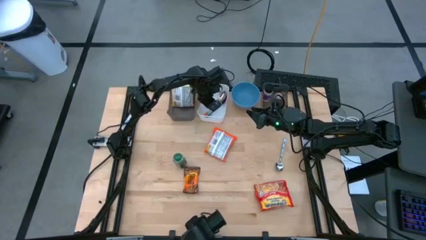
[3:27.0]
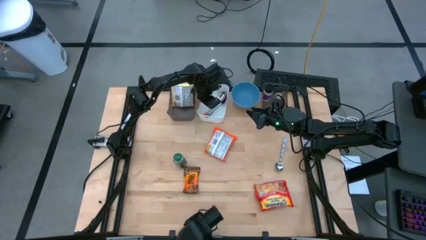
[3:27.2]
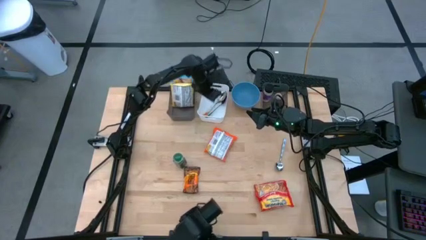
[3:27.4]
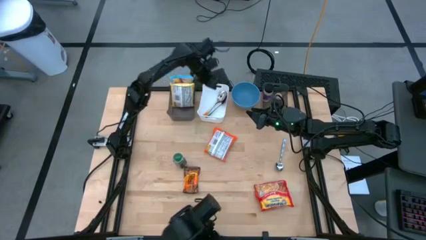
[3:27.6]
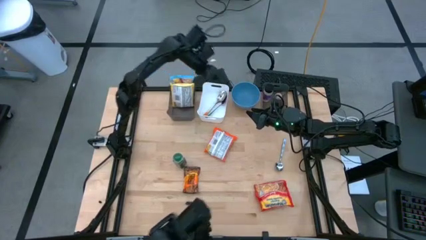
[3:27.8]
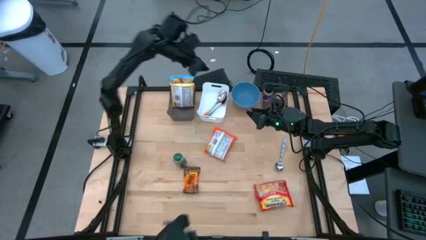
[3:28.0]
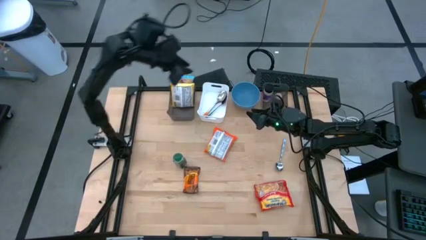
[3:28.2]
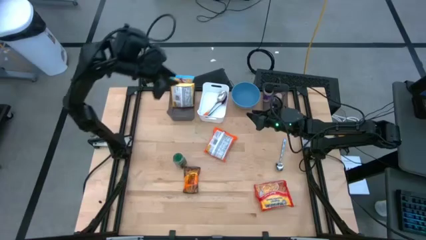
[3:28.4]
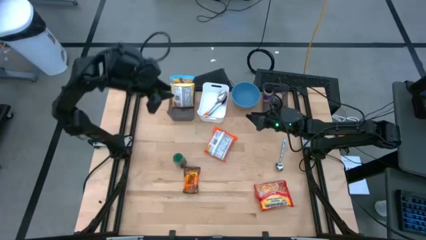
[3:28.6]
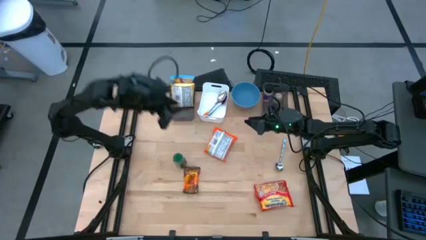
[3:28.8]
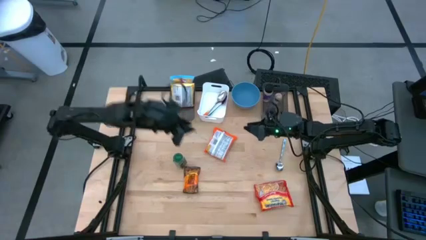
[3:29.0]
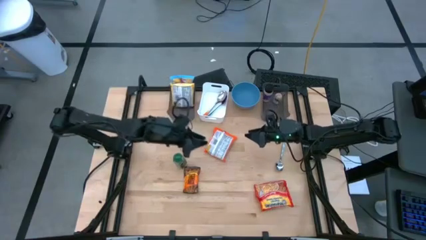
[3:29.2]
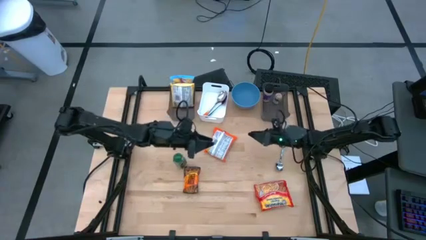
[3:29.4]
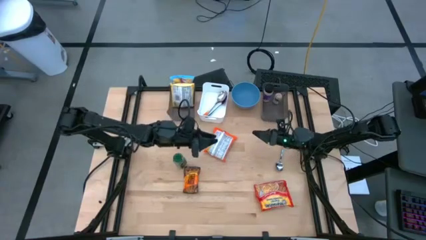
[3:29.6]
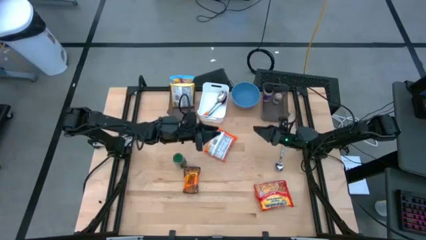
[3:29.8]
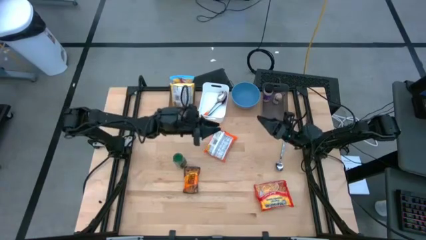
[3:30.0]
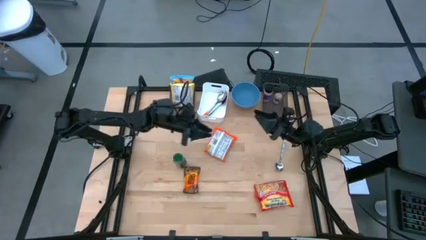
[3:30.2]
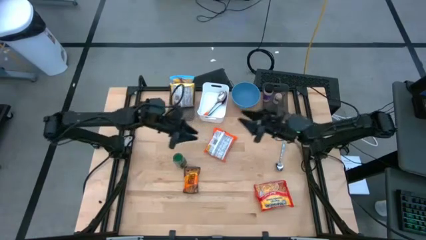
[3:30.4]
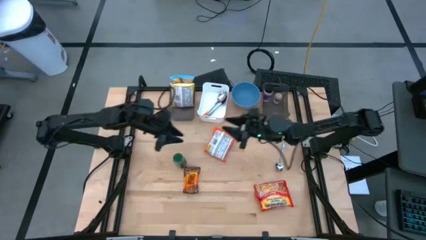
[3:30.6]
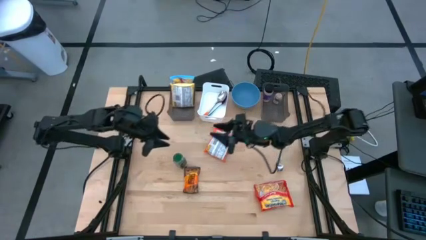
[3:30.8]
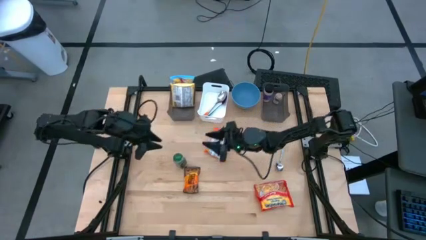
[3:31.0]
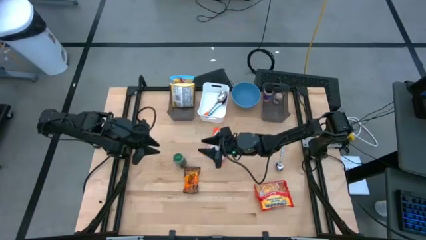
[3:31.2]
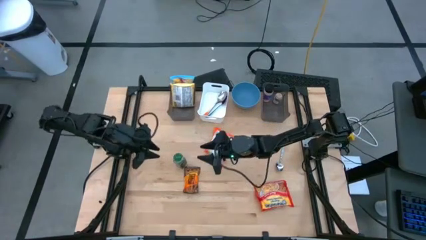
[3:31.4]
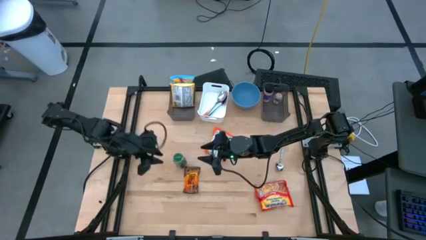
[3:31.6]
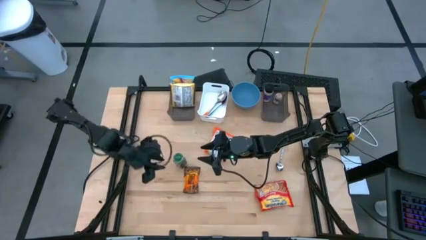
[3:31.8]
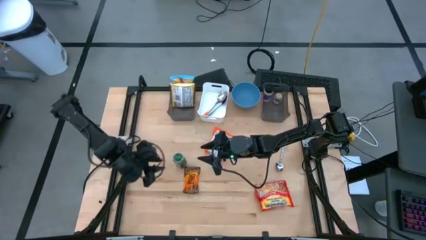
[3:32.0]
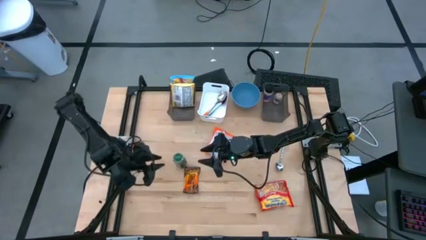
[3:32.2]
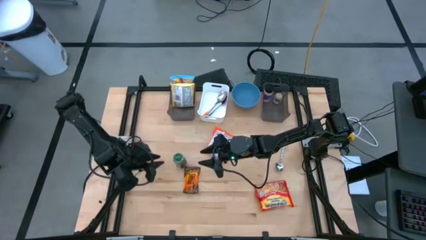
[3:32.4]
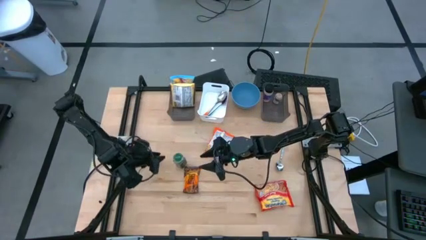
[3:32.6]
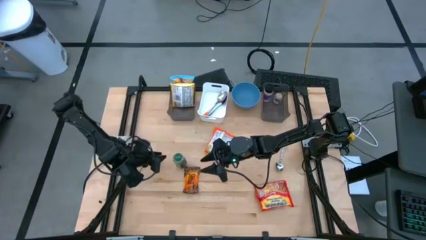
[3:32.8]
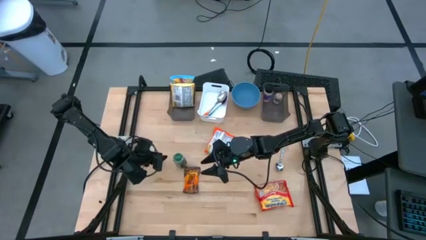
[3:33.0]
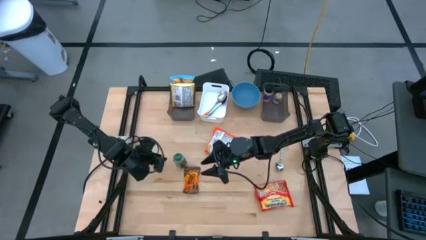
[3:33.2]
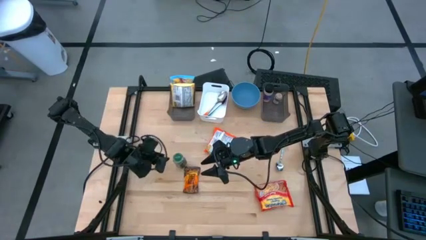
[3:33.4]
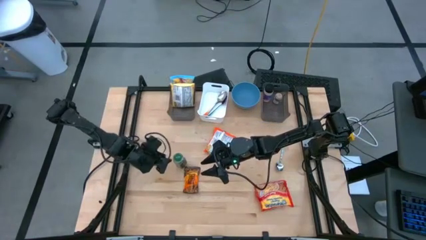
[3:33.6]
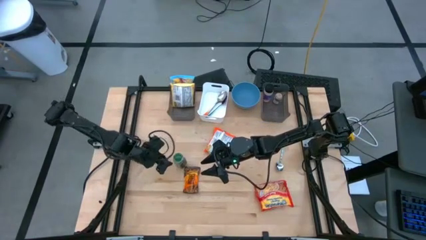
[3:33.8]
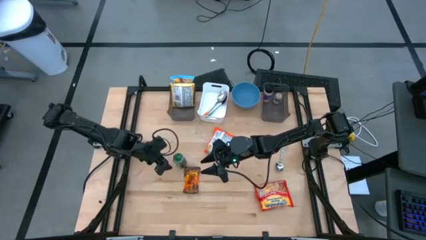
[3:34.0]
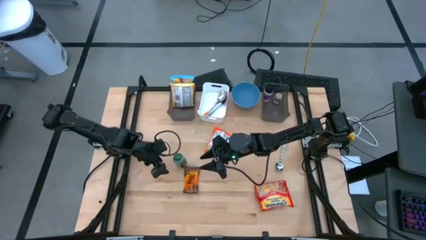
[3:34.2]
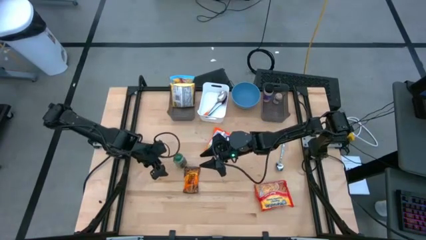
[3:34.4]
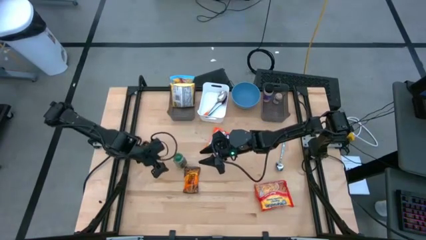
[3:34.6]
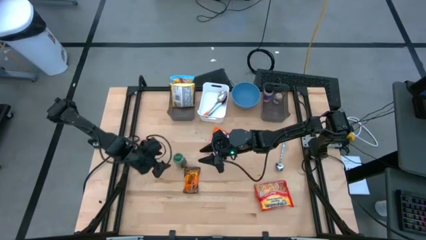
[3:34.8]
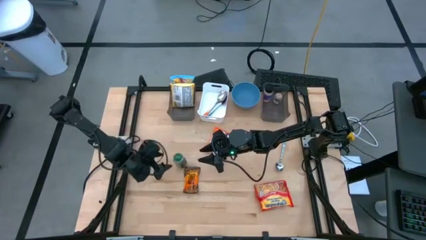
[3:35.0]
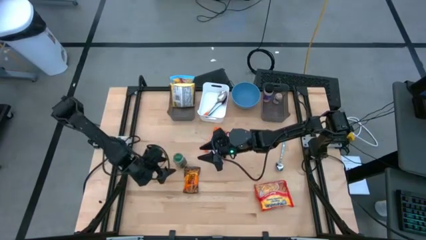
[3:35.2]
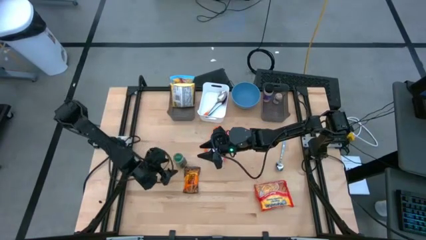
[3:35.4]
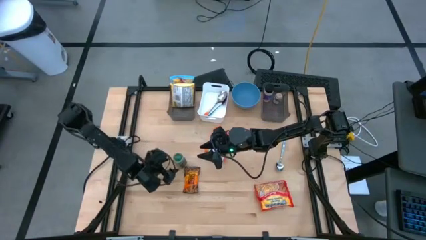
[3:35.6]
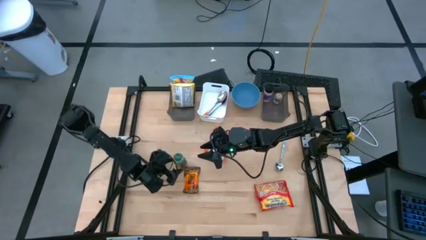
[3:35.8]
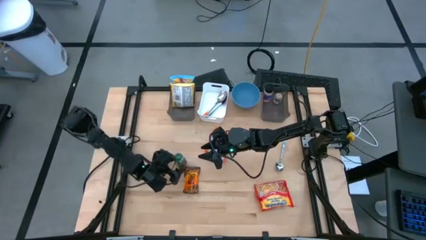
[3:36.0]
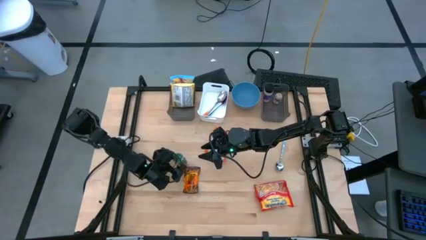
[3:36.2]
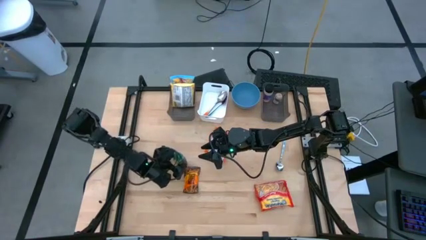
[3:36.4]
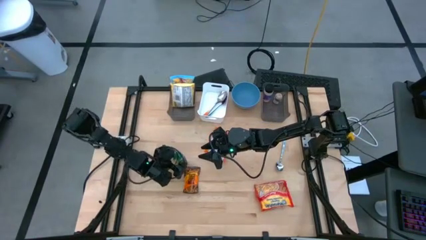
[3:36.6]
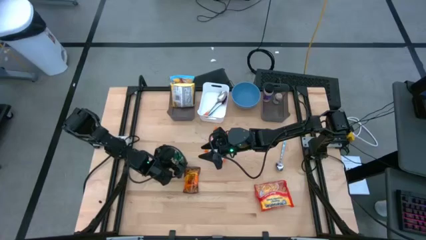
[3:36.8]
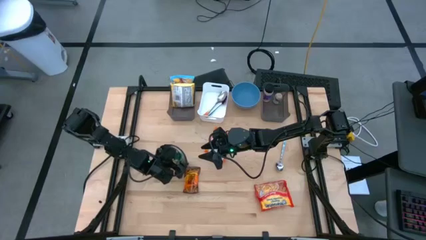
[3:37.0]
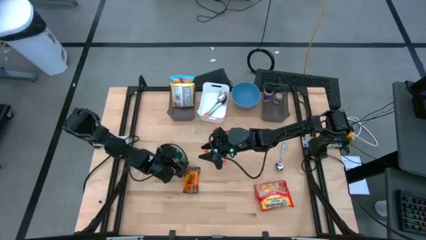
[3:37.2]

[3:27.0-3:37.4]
Task: Pick & Place Food Item
Put the green spice bottle into the right black bin

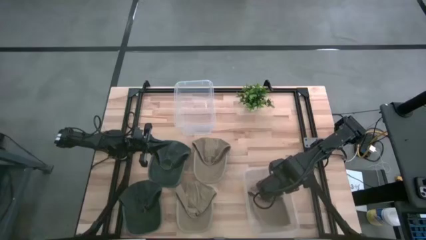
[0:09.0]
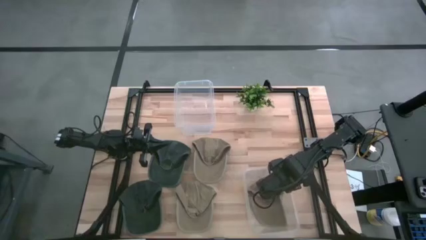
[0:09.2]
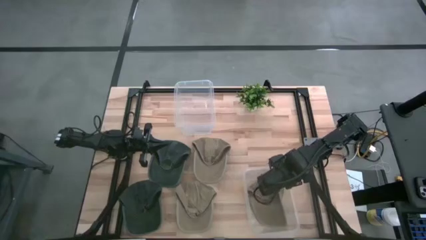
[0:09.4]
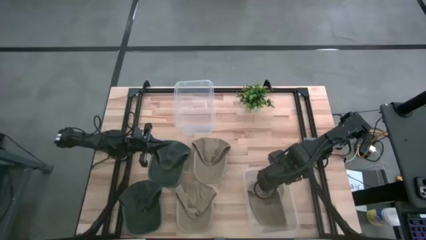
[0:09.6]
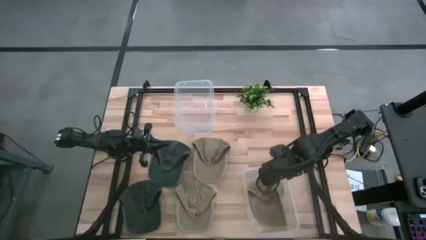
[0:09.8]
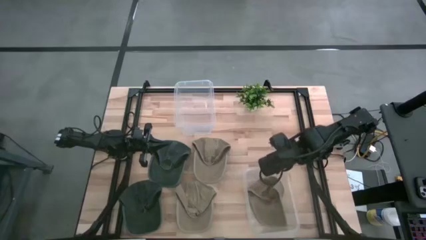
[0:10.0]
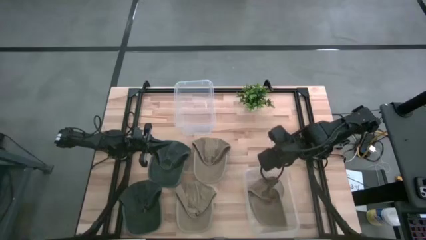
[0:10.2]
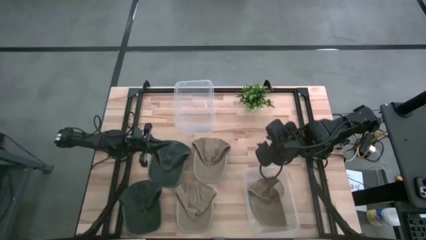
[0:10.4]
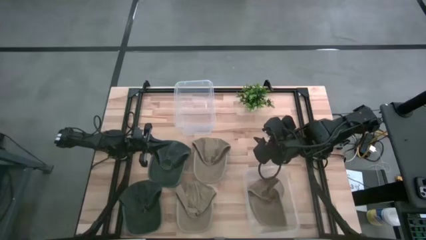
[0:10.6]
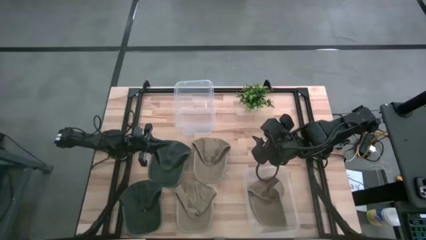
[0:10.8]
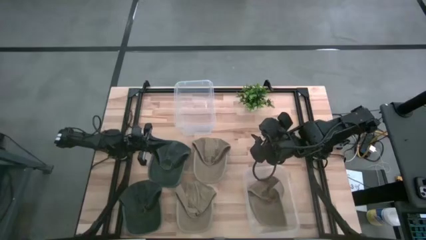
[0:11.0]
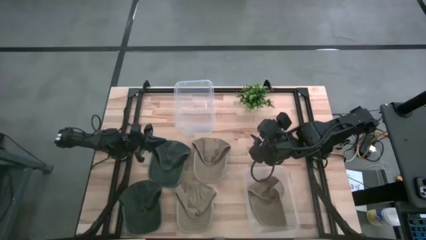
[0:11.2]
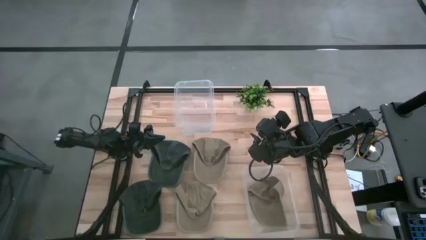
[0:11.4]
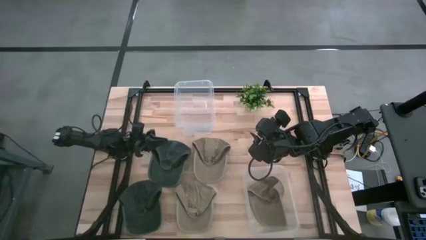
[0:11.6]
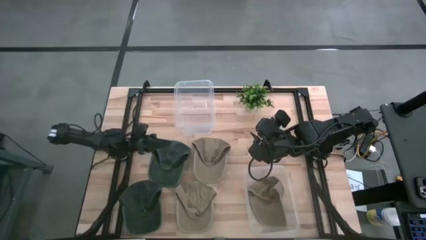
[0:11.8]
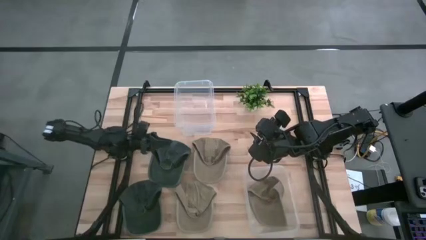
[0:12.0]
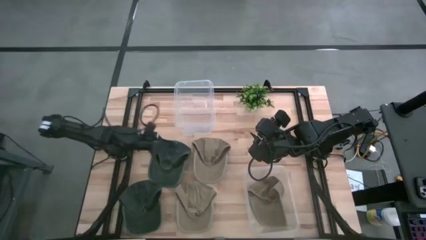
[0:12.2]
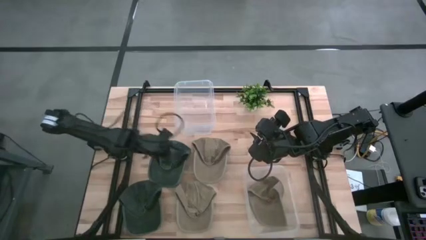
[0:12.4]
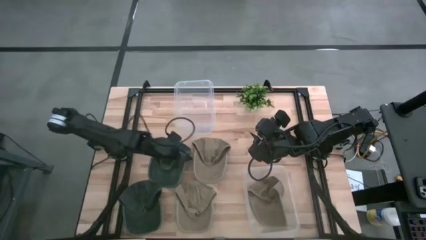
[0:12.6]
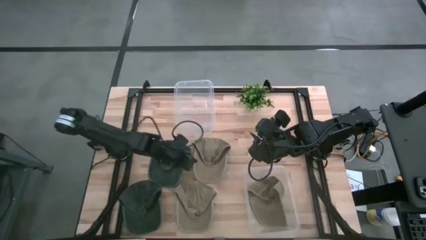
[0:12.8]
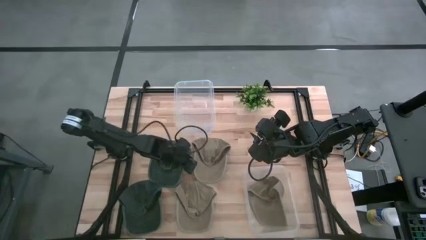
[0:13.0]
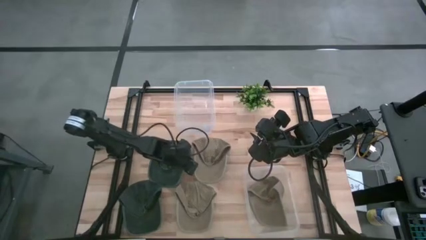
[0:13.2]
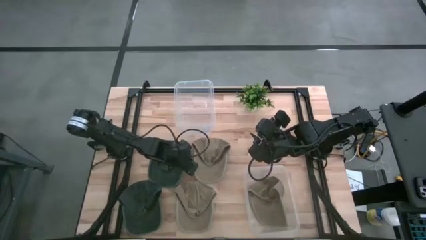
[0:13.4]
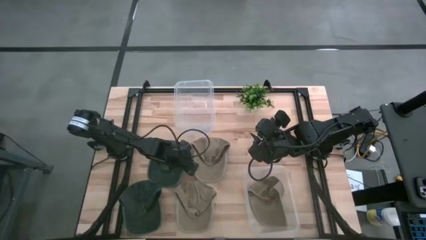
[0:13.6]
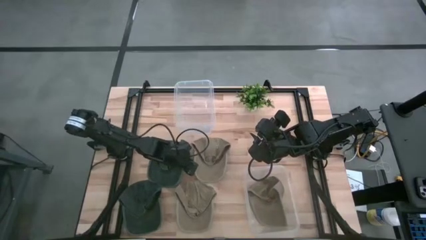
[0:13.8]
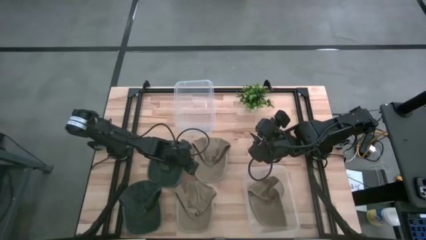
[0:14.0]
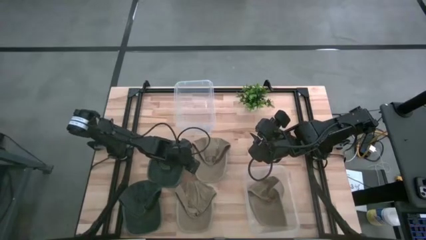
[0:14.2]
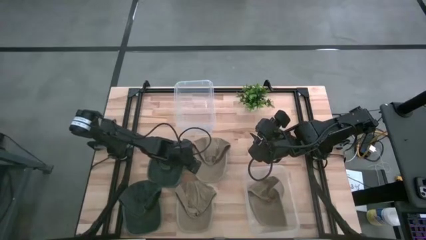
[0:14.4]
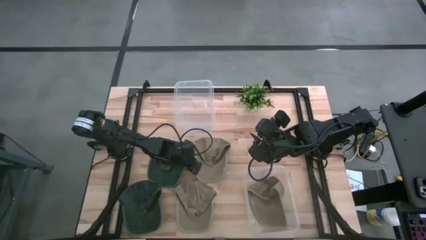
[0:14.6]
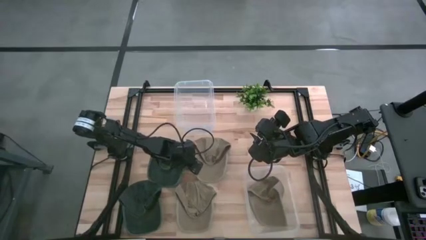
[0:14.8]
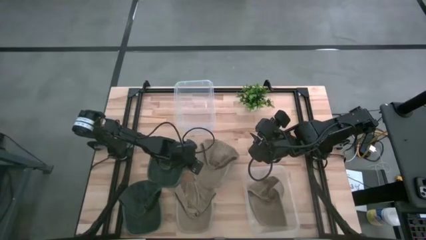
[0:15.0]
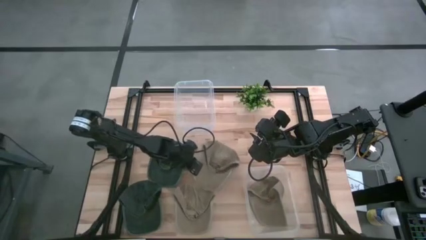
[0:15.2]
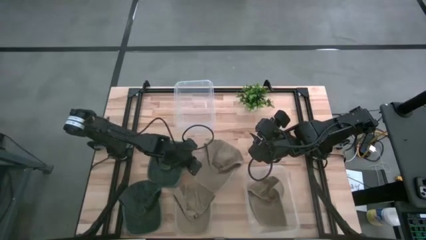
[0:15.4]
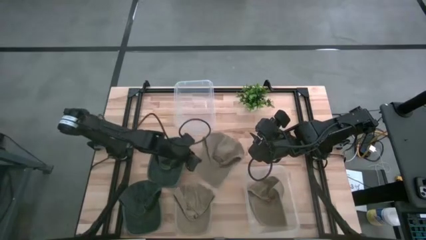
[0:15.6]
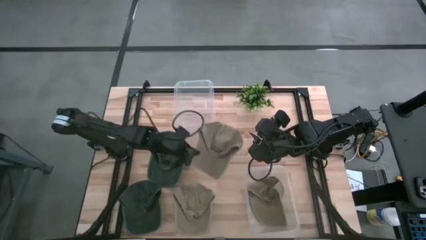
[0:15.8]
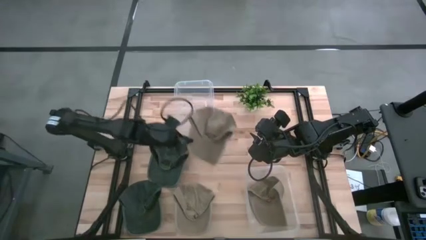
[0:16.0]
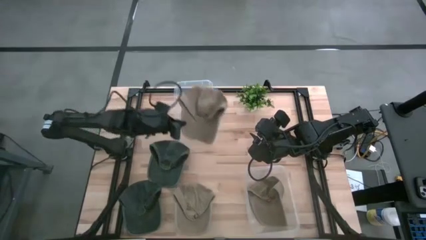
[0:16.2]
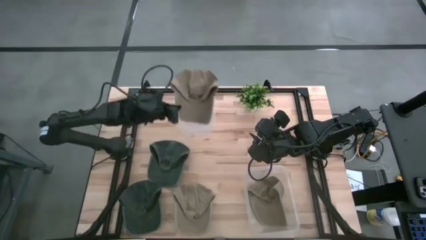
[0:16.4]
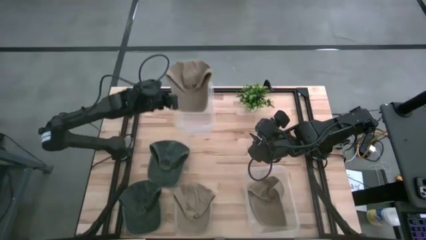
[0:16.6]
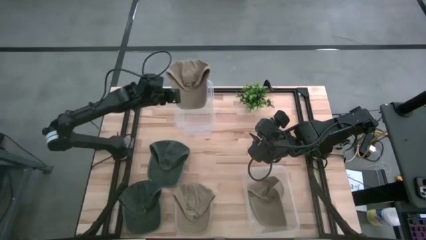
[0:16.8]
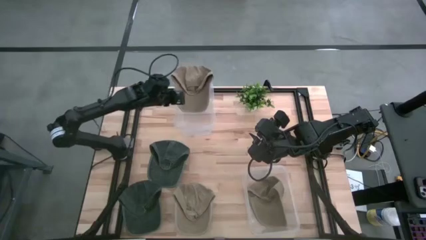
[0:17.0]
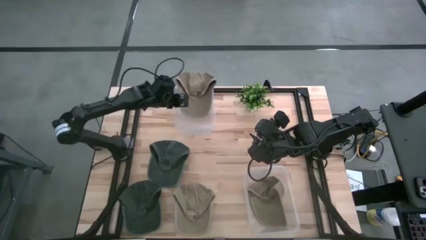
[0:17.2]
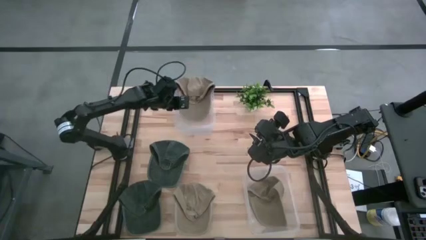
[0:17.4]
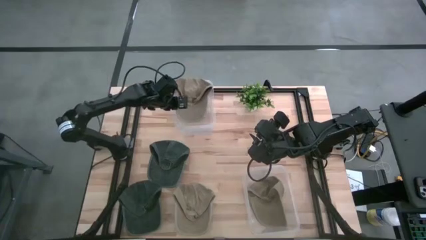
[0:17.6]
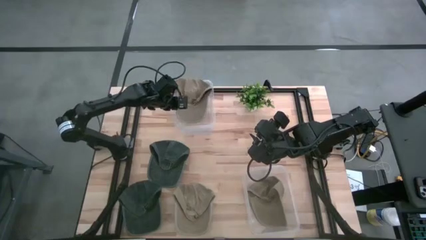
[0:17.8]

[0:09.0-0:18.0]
Task: Pick & Place hat
Put the top brown cap into the top transparent bin
